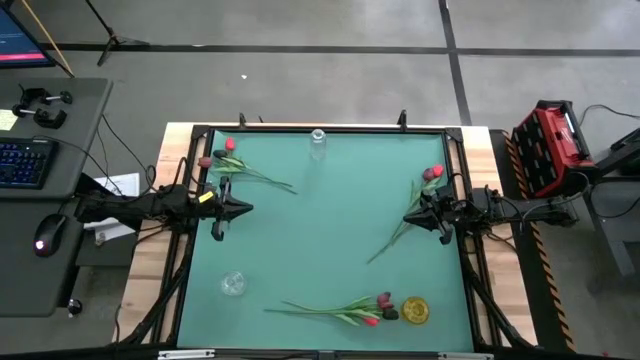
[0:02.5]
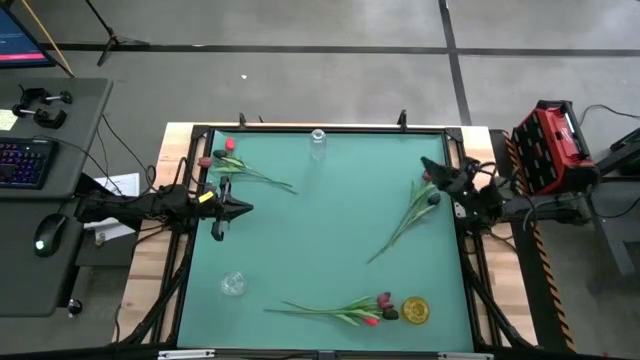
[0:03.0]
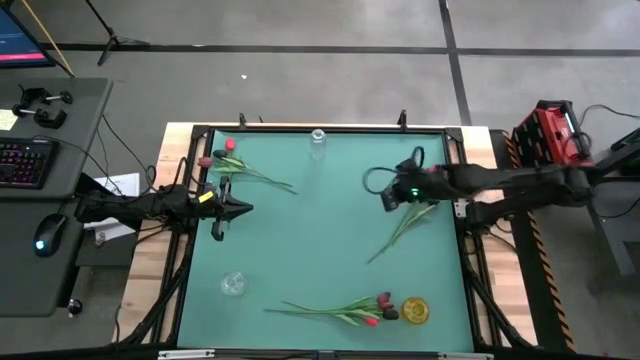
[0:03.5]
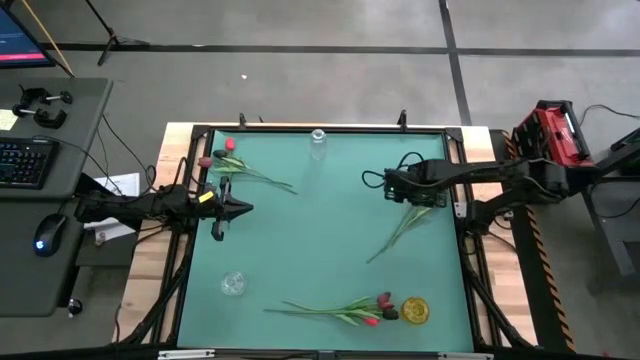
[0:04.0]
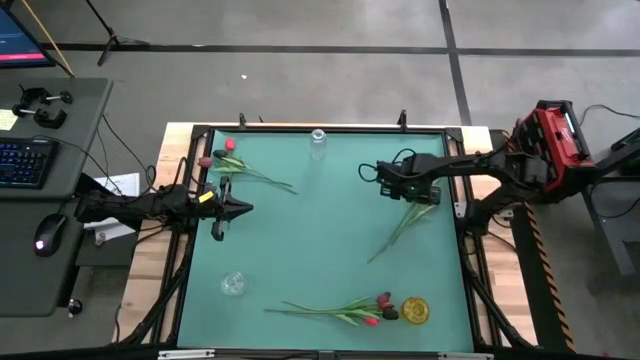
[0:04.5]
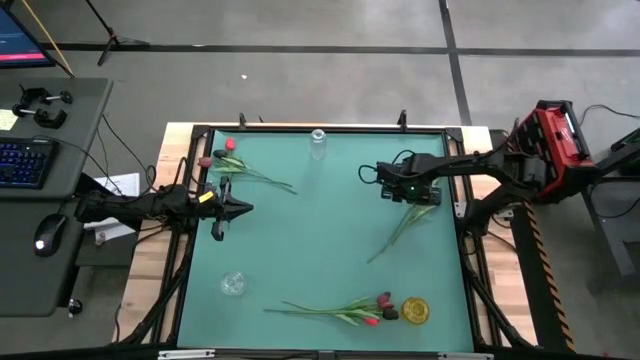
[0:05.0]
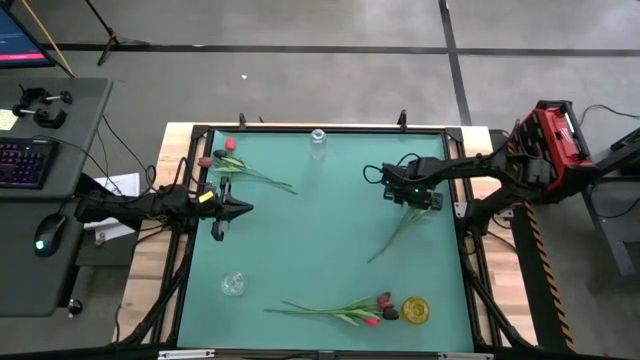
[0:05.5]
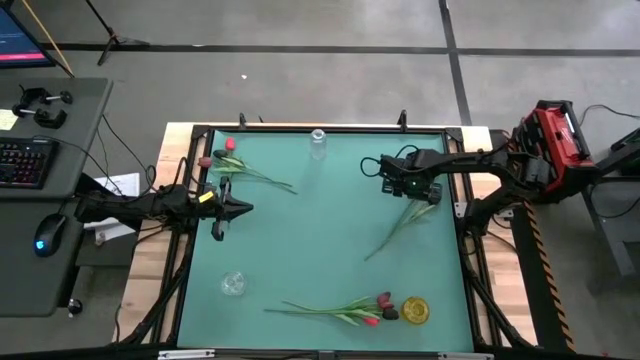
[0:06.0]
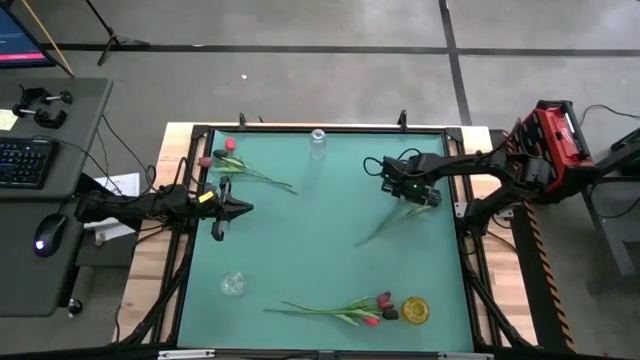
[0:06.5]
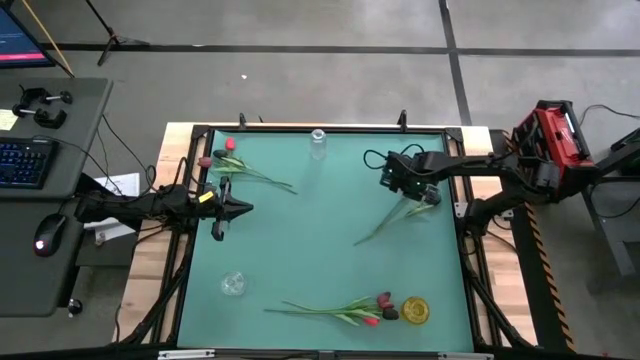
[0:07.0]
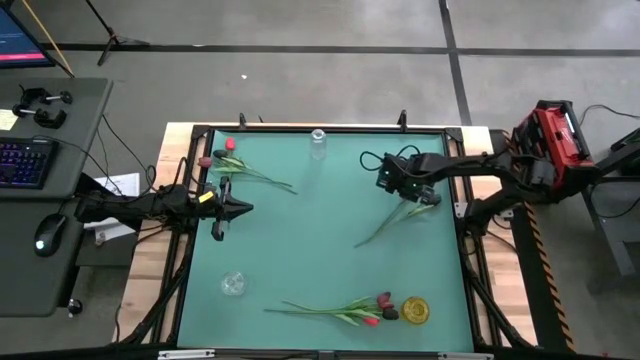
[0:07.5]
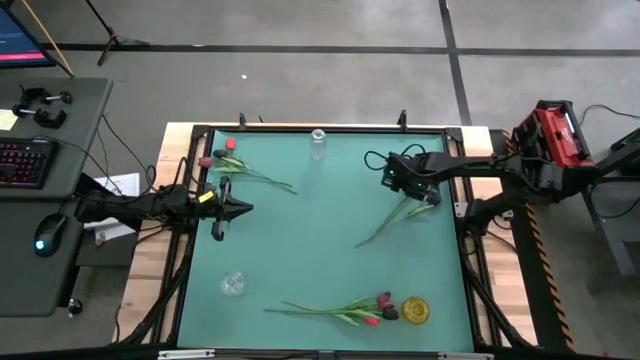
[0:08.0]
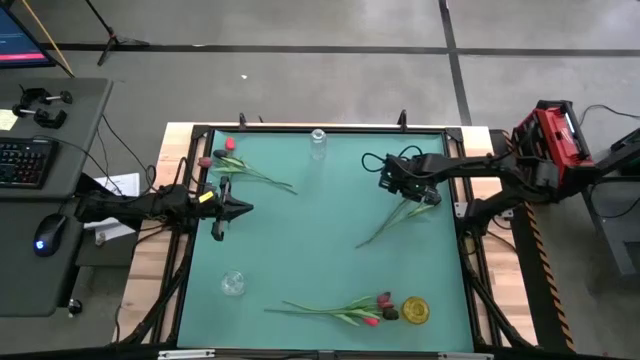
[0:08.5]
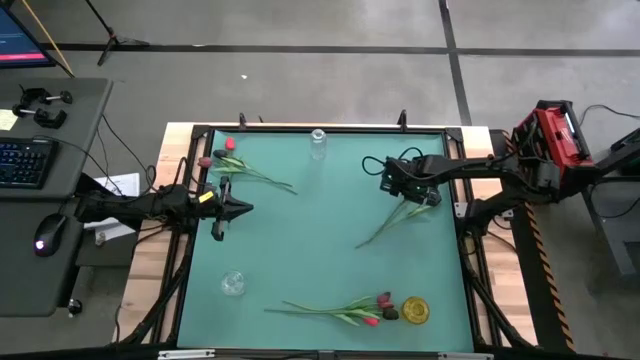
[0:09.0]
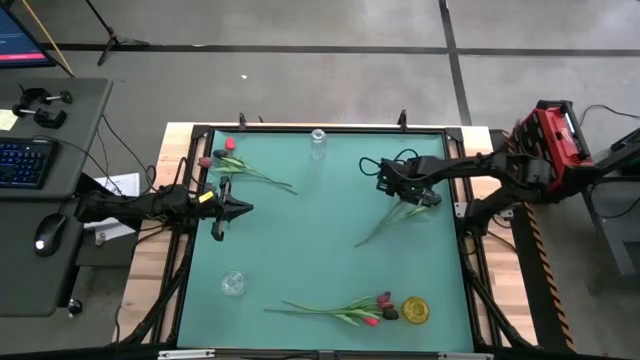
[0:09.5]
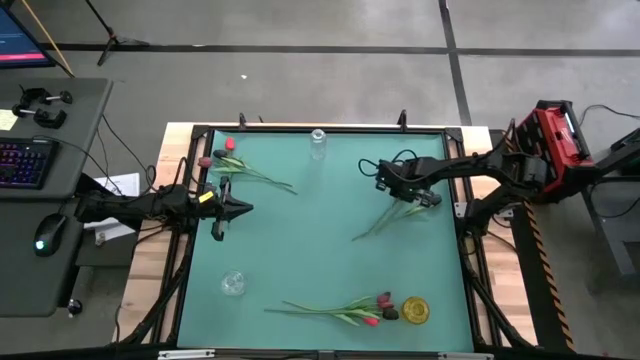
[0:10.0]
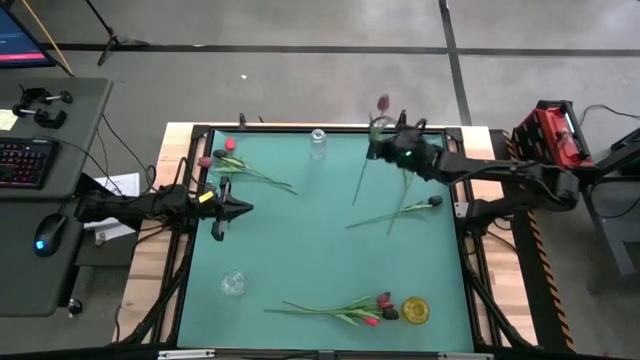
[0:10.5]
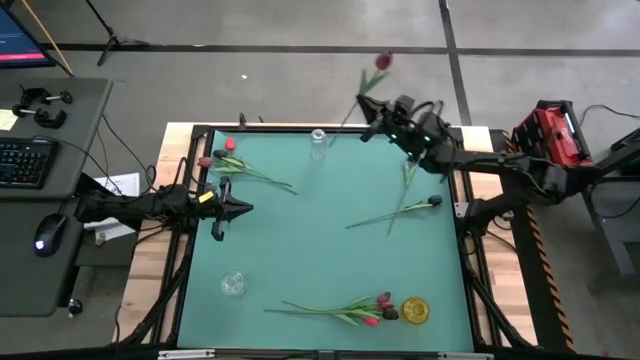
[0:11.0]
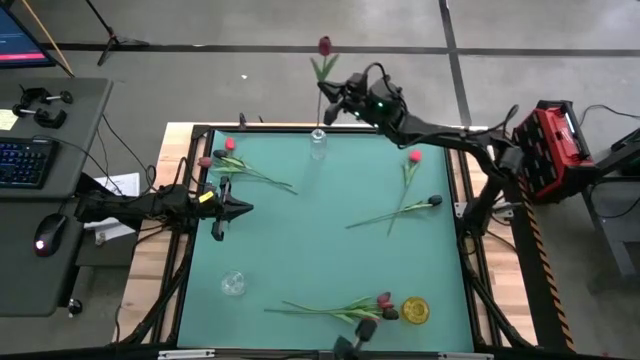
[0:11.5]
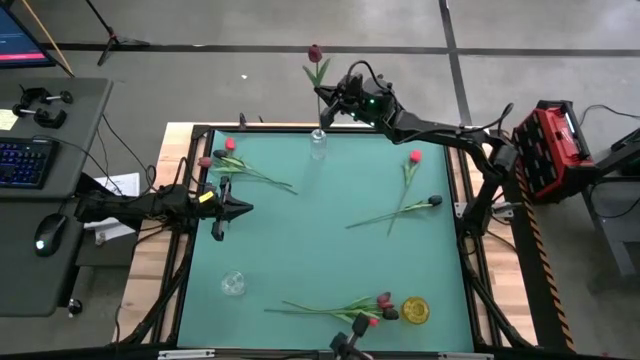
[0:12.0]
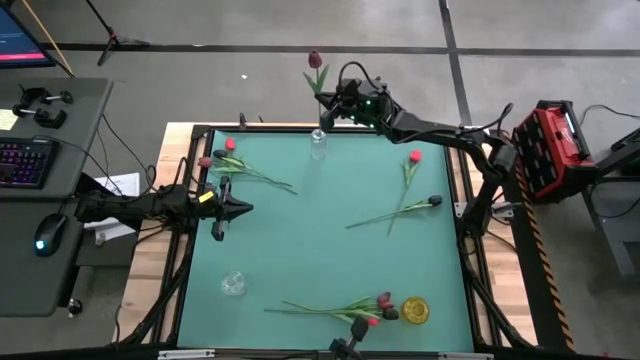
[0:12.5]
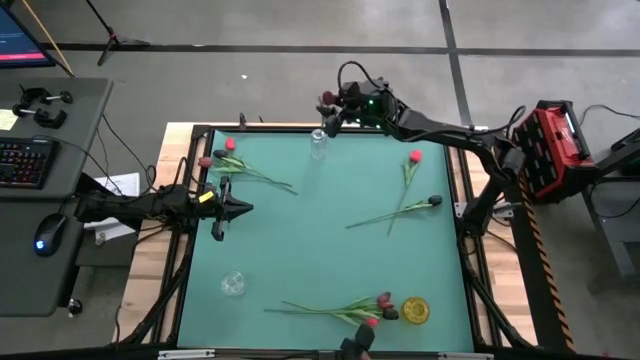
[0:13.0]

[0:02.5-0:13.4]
Task: Sort flowers into vase by color
Put the top right red flower into the top transparent vase

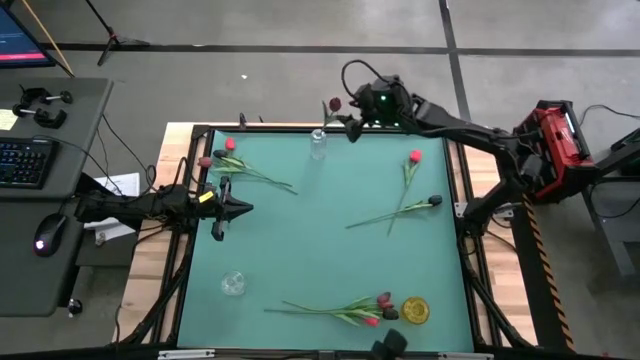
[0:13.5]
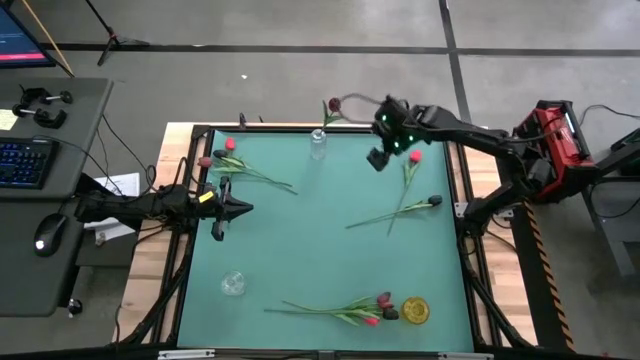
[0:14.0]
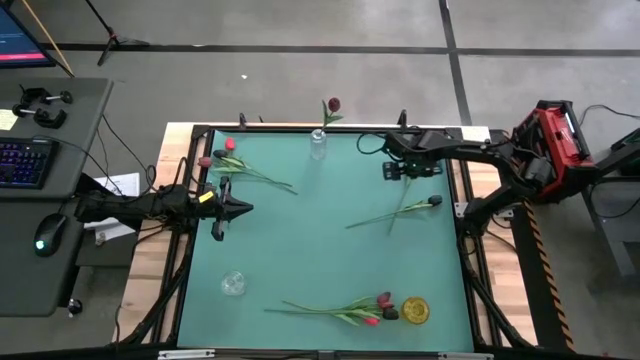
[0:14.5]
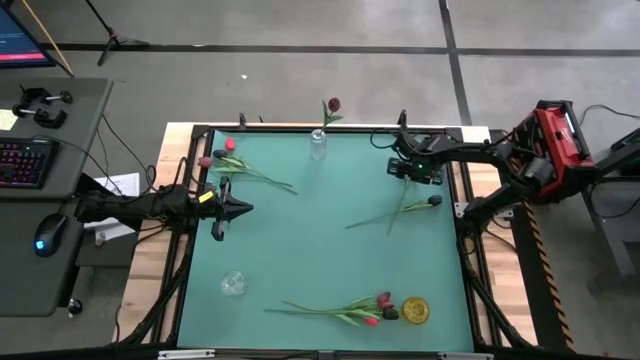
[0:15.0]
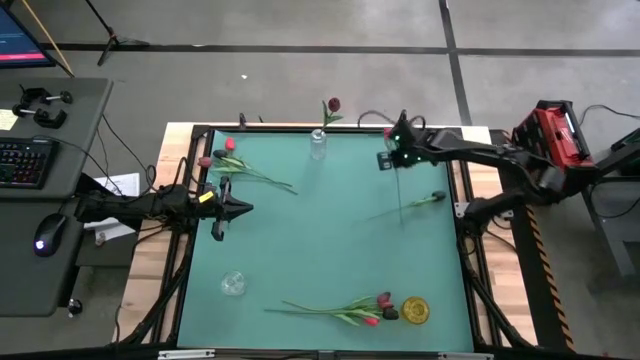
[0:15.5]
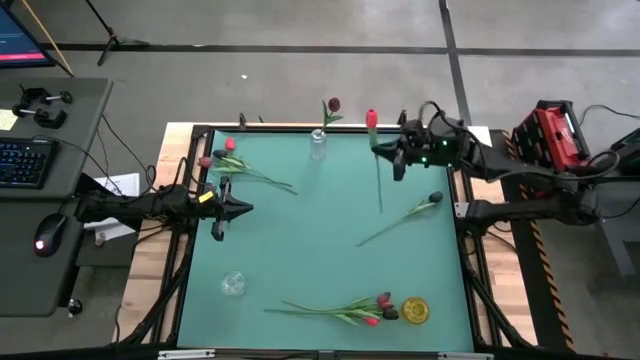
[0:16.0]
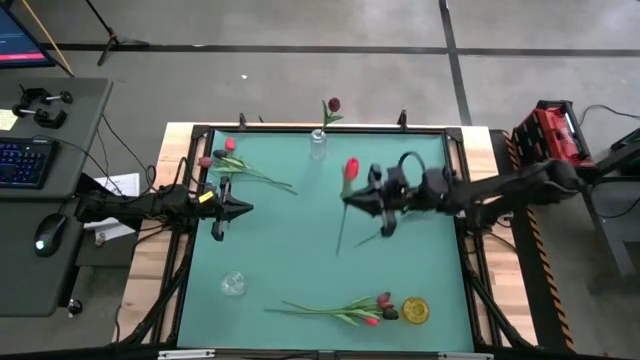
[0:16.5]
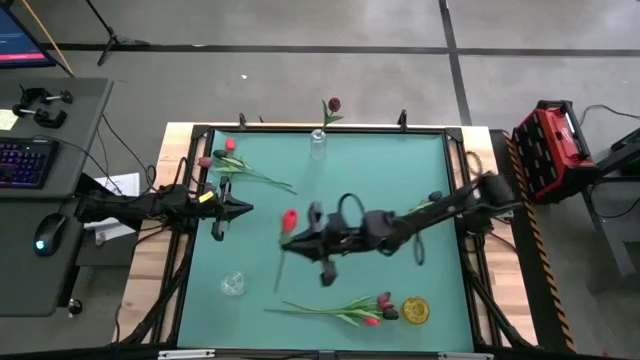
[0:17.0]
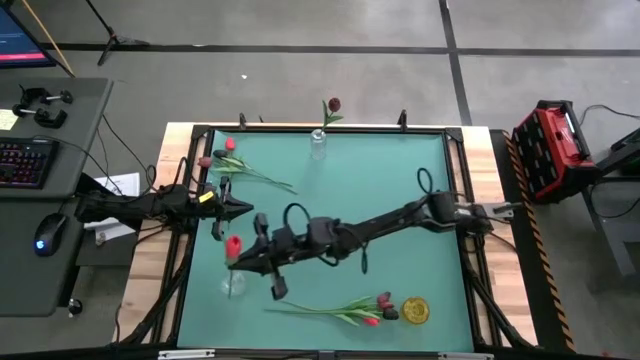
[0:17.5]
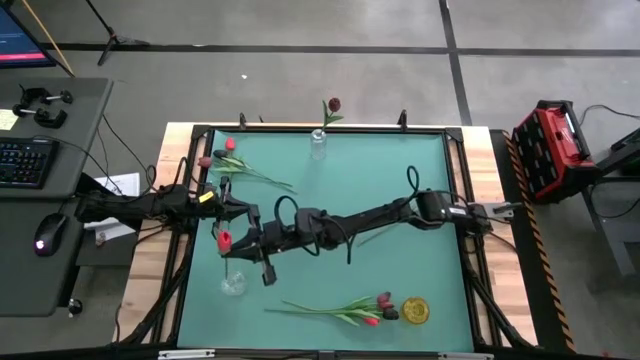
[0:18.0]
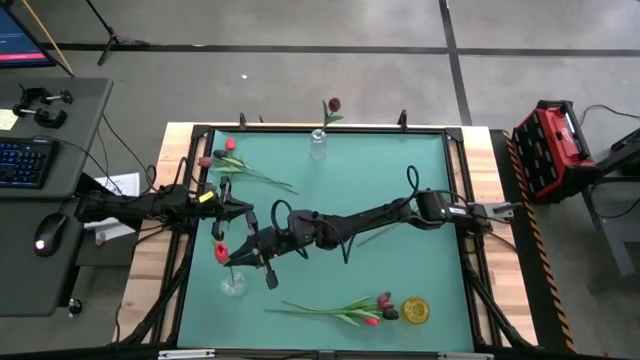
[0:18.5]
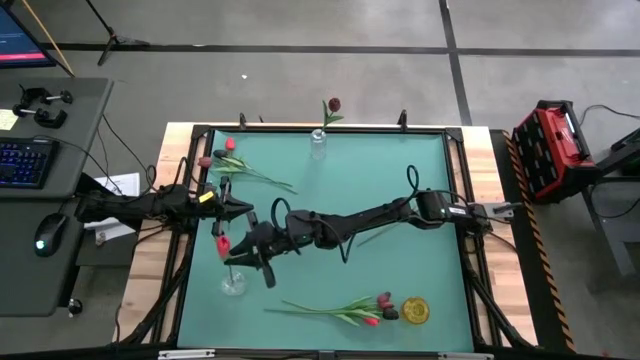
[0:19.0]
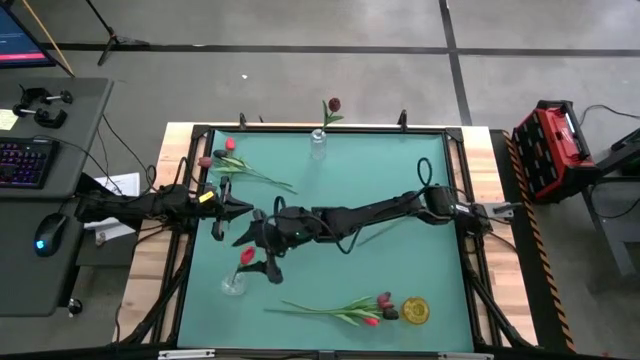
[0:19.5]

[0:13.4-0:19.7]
Put the top right pink flower into the bottom transparent vase

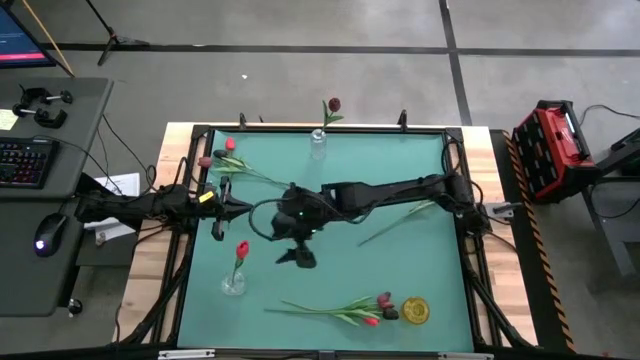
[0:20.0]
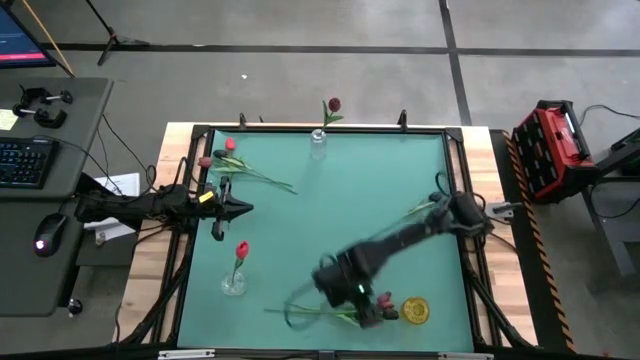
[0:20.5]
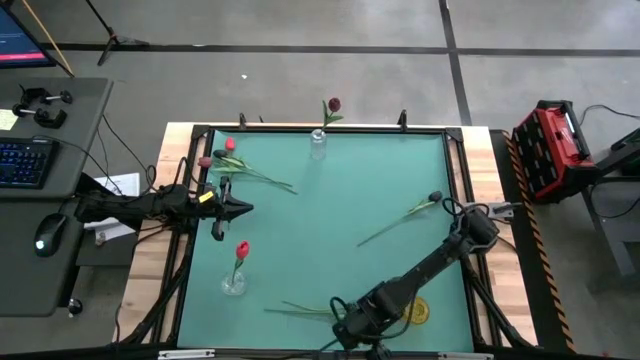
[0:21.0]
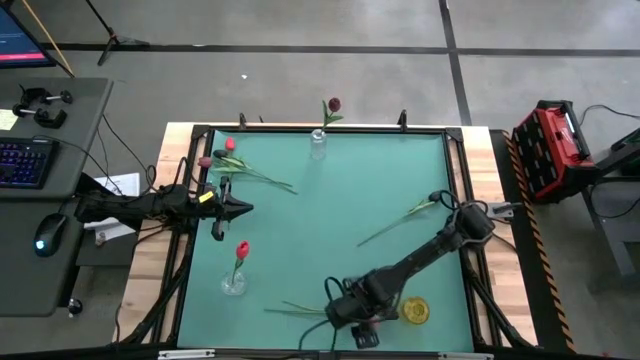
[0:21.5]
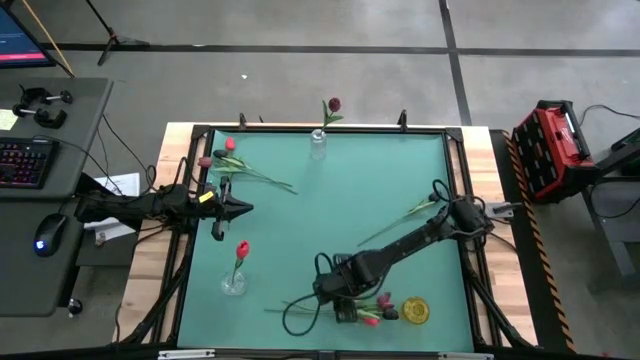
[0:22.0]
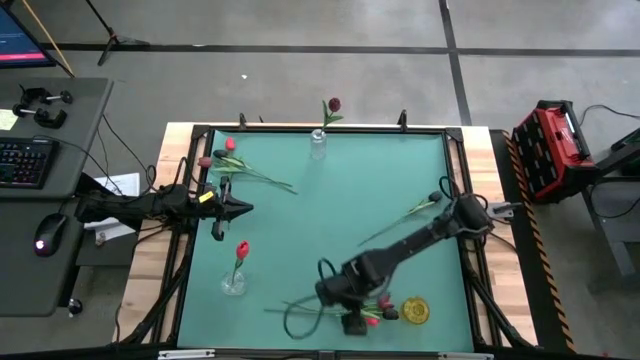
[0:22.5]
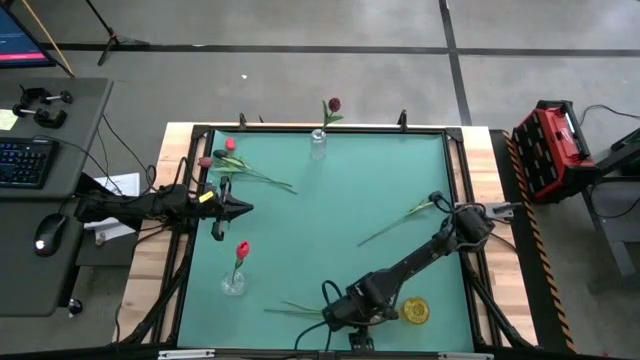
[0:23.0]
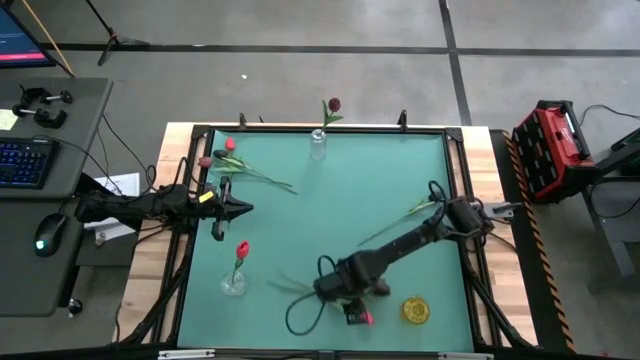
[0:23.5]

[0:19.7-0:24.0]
Move the red and black flowers to the center of the table
